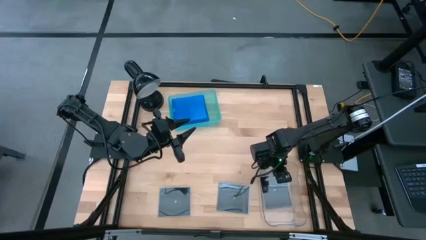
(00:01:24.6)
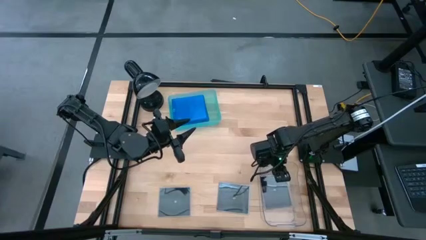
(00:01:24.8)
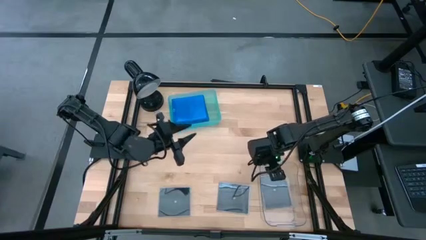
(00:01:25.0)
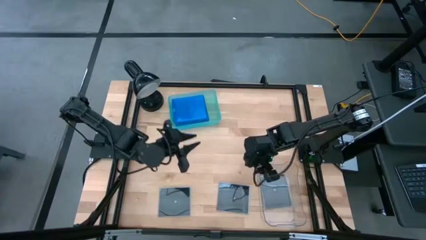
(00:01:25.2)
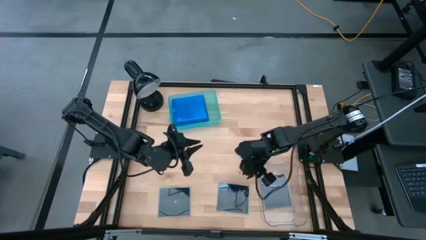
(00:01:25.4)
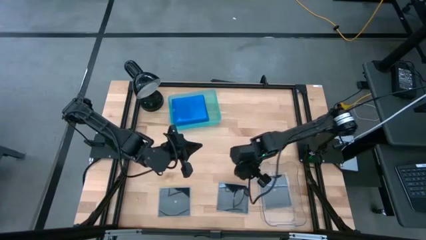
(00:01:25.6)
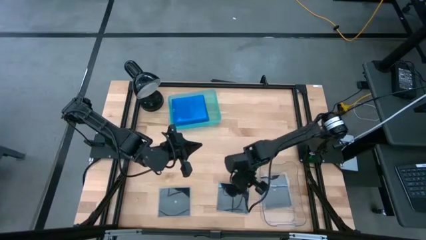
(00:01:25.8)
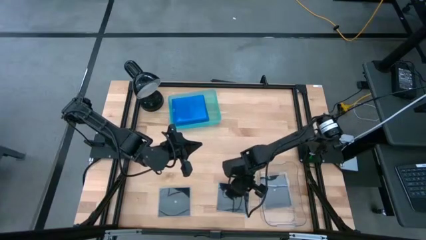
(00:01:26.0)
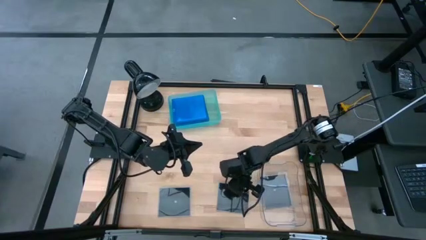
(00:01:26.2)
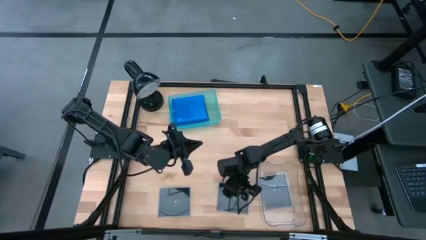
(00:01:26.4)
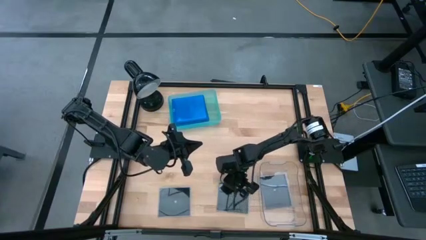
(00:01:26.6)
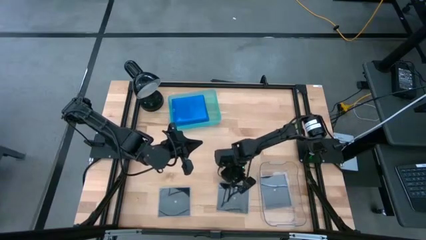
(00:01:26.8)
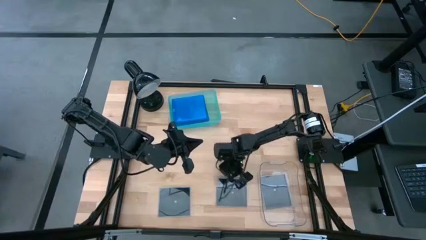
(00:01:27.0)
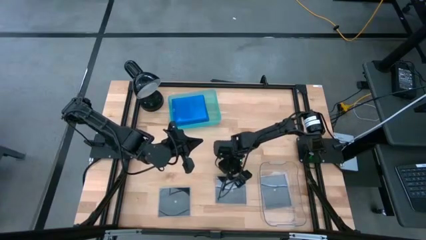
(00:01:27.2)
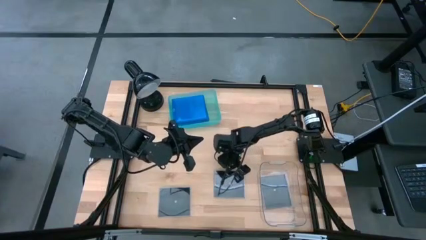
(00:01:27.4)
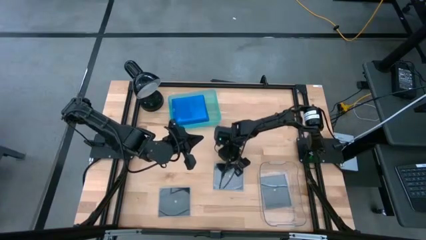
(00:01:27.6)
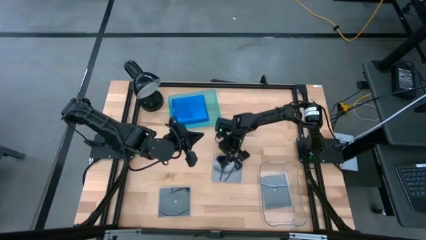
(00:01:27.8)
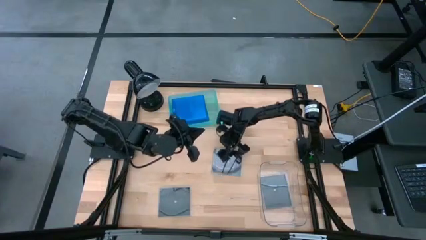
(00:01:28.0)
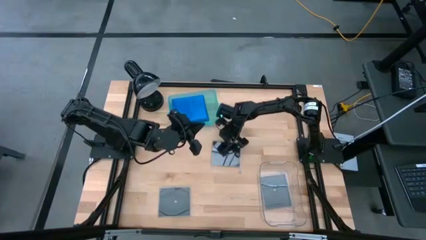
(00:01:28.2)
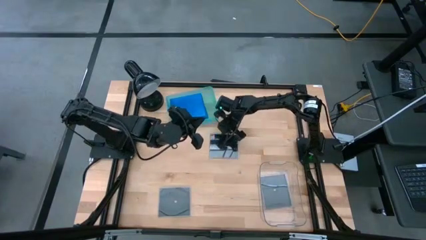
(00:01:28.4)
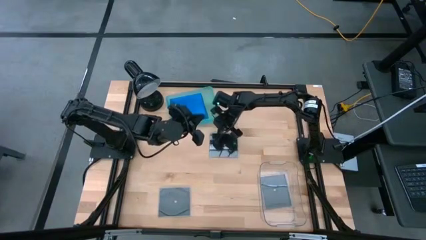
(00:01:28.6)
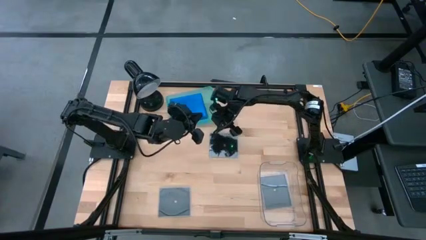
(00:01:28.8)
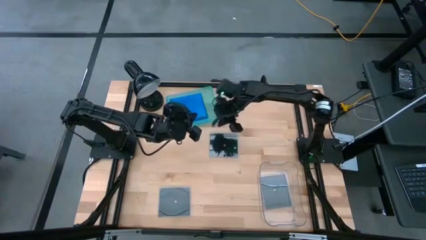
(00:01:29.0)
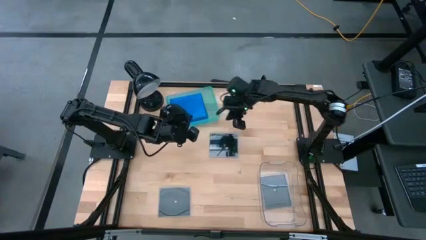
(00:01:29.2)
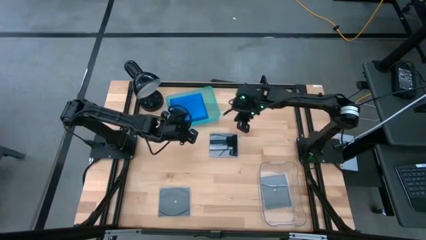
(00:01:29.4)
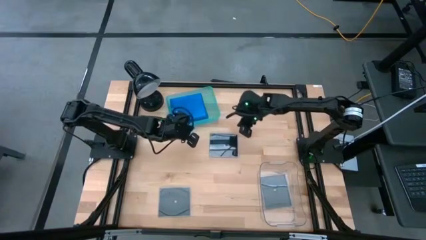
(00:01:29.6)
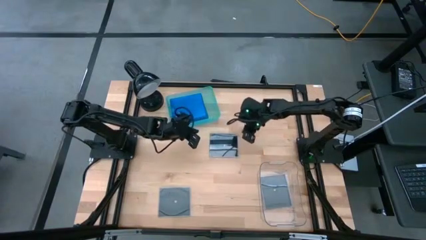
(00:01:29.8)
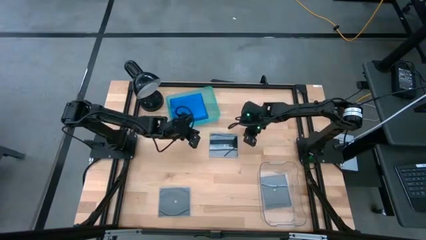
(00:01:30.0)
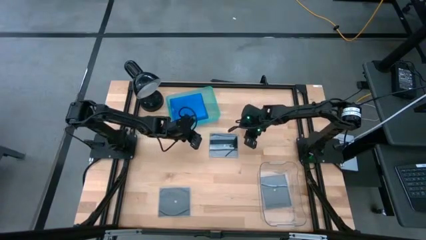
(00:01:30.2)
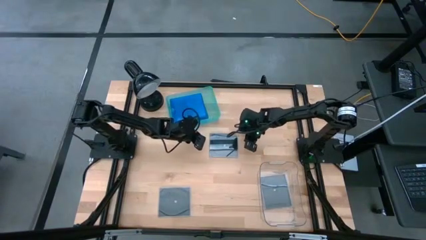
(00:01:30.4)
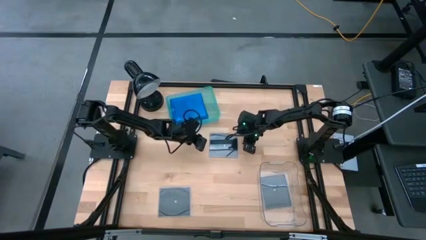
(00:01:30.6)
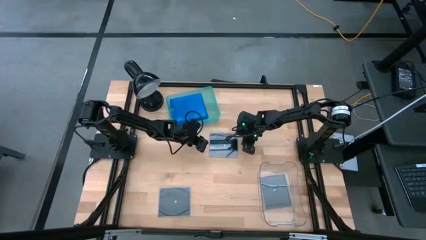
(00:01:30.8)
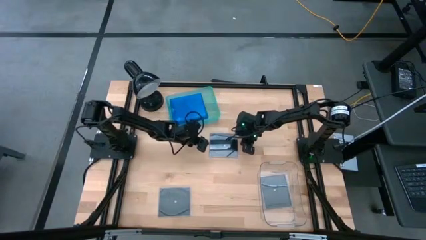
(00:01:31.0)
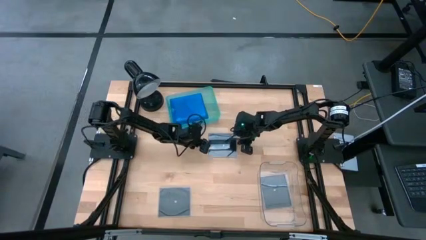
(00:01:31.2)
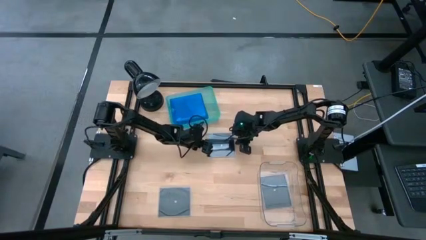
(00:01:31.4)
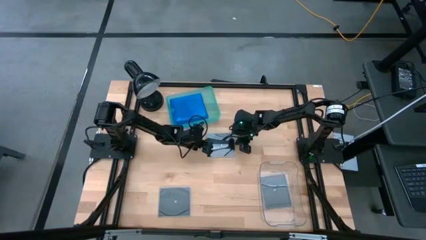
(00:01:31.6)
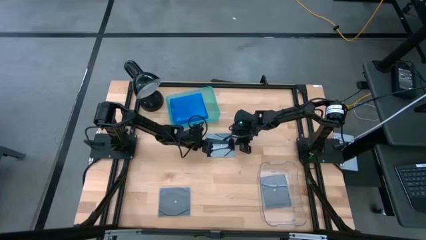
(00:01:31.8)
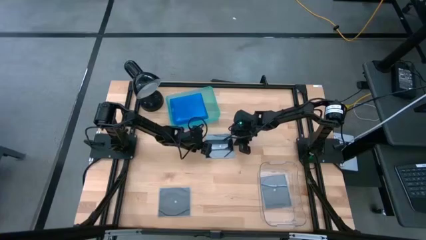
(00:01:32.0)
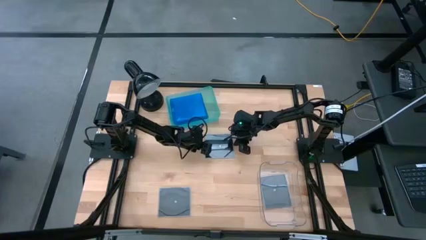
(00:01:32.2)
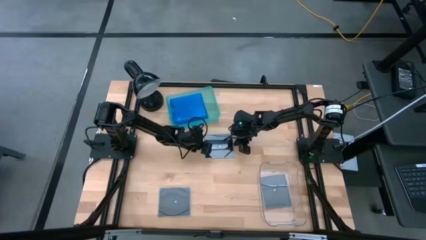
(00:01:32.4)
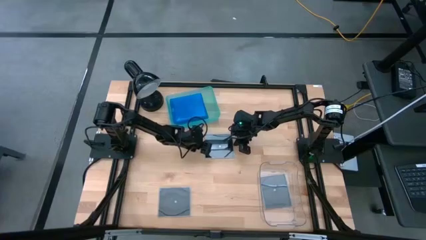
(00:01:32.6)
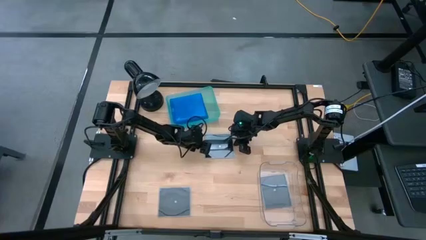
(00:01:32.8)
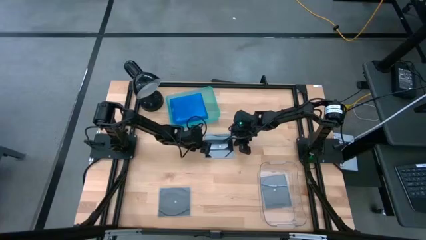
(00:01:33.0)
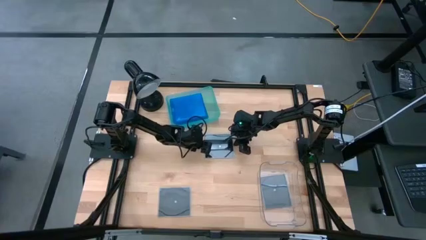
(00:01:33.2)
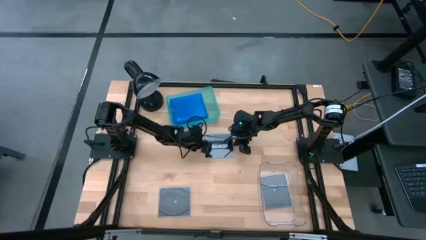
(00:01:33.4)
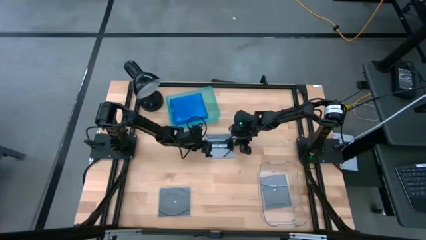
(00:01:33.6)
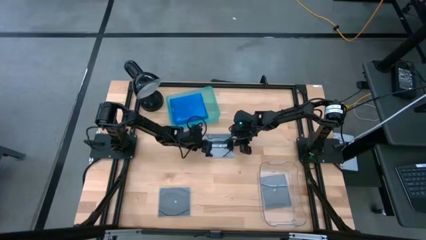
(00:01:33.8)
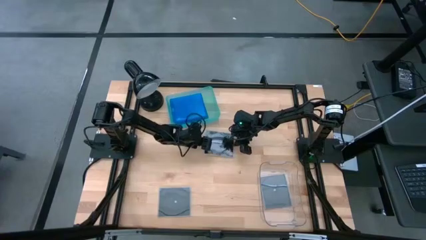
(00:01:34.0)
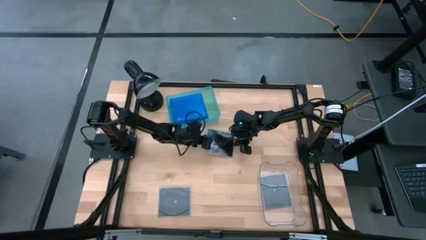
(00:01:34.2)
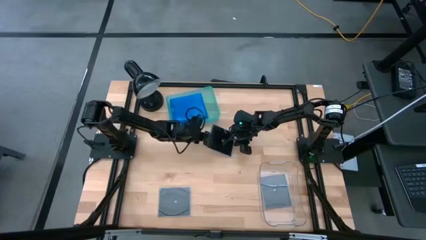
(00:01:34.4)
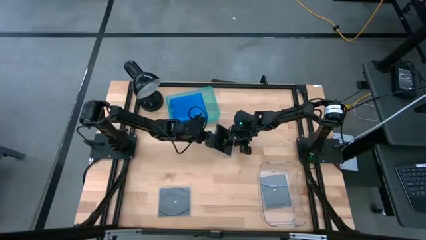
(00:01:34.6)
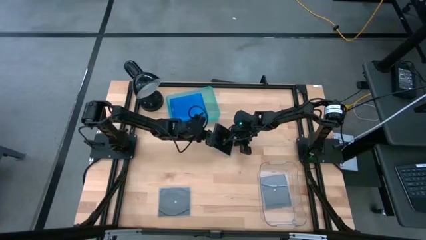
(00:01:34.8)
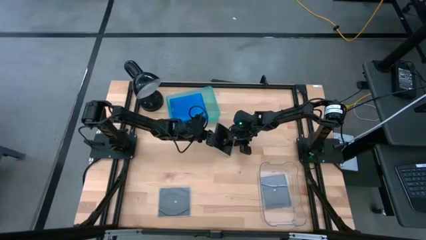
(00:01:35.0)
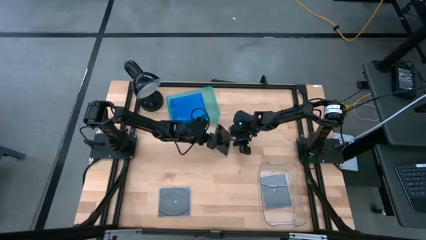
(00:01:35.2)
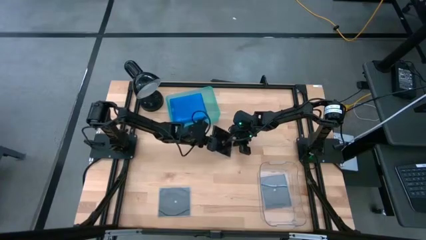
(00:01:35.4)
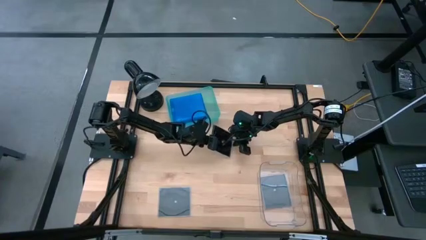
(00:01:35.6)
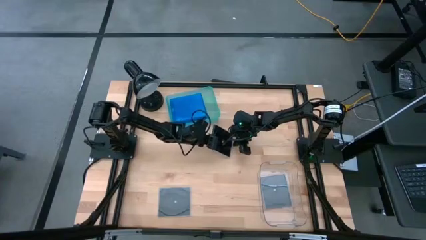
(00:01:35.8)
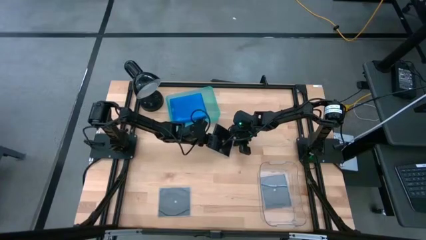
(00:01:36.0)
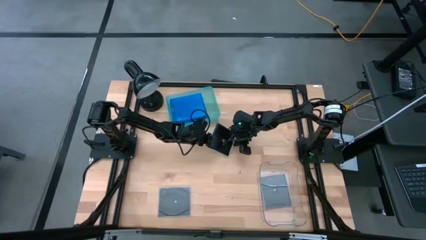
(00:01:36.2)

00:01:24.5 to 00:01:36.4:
Task: Pick & place jewel cases by type
Put the right black CD case into the transparent bin

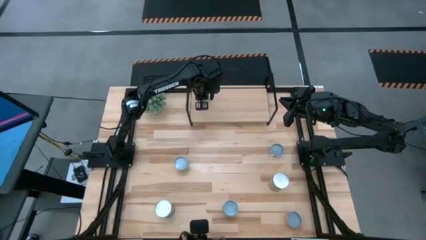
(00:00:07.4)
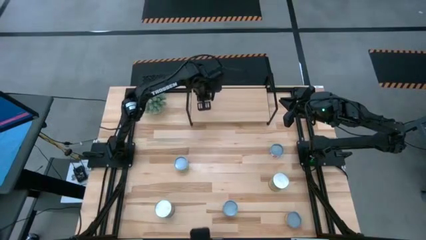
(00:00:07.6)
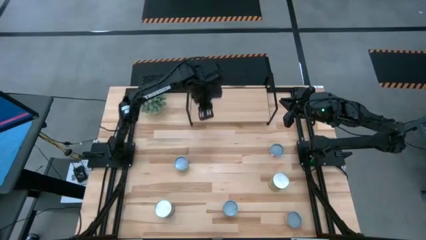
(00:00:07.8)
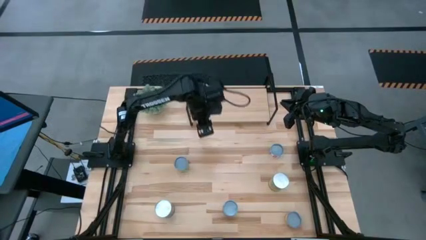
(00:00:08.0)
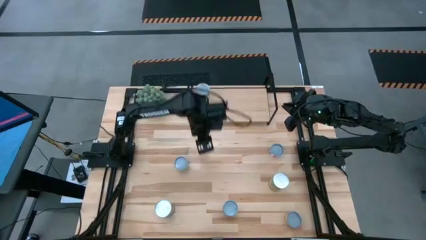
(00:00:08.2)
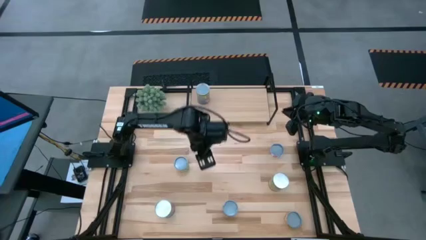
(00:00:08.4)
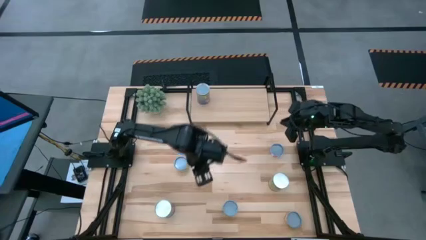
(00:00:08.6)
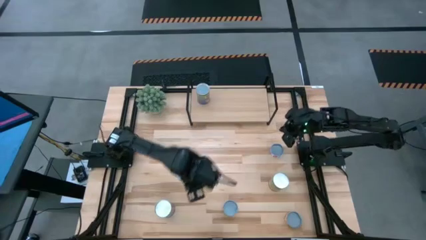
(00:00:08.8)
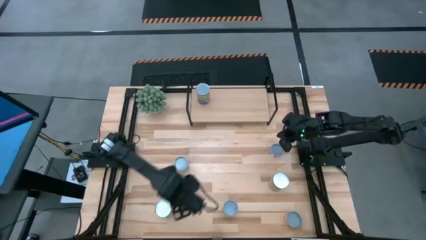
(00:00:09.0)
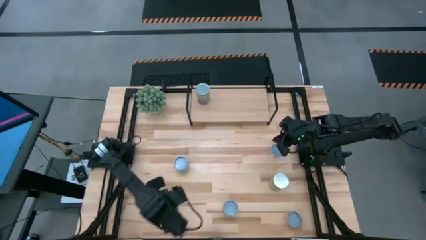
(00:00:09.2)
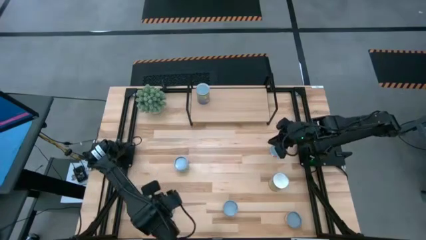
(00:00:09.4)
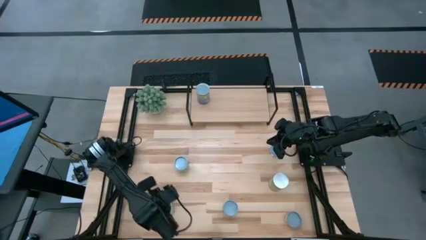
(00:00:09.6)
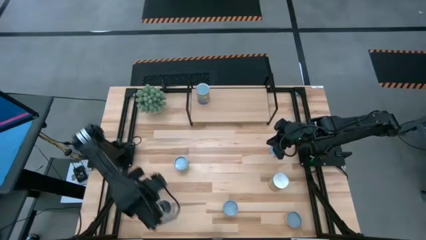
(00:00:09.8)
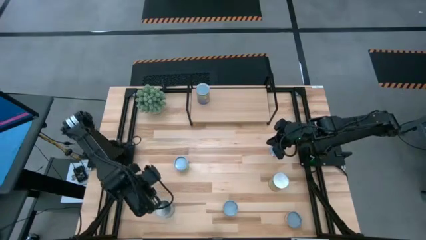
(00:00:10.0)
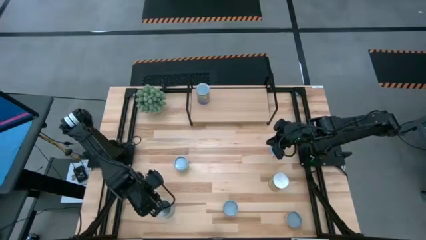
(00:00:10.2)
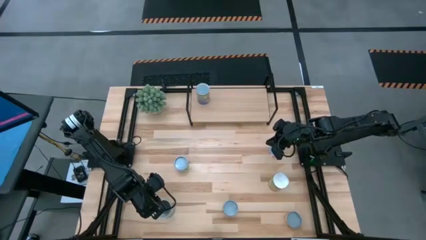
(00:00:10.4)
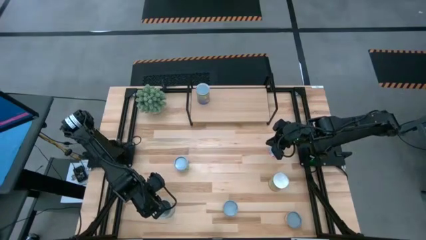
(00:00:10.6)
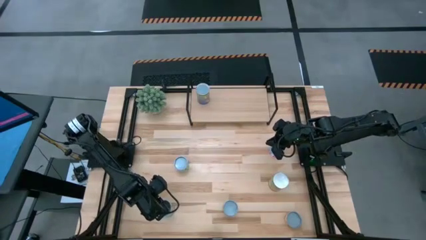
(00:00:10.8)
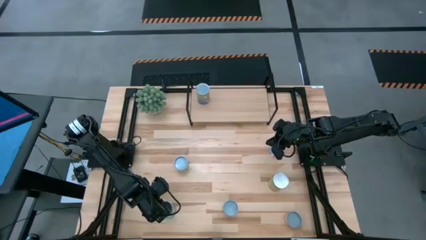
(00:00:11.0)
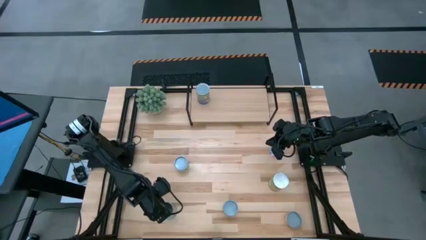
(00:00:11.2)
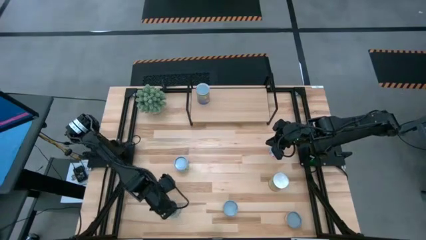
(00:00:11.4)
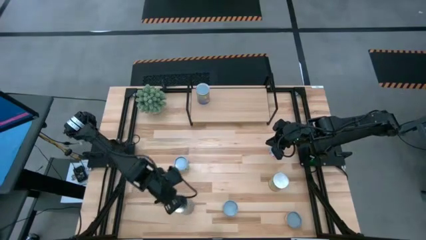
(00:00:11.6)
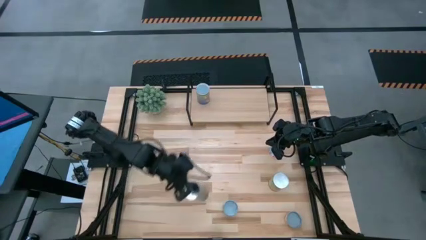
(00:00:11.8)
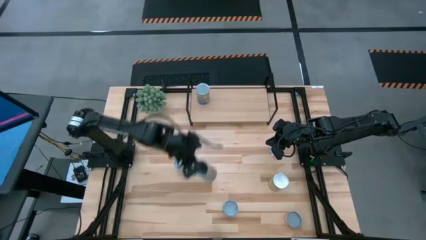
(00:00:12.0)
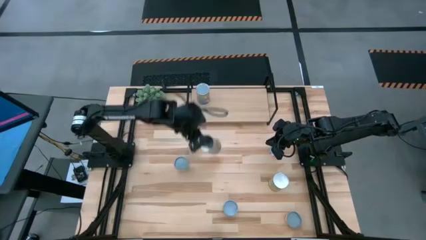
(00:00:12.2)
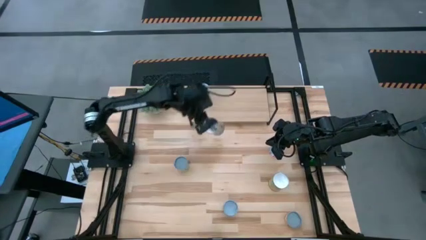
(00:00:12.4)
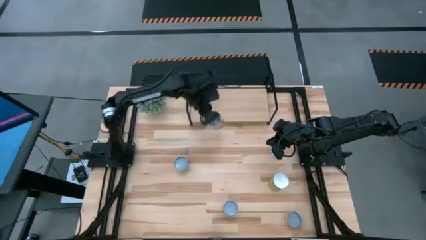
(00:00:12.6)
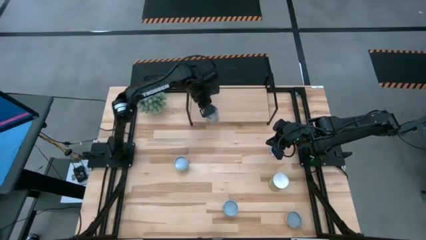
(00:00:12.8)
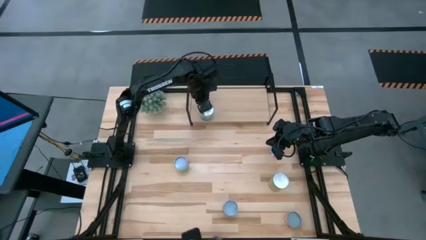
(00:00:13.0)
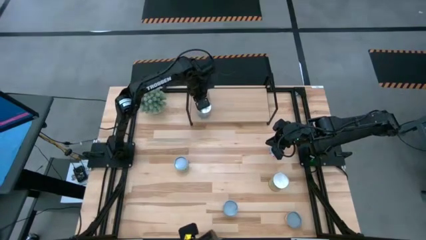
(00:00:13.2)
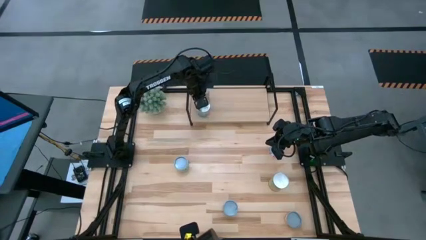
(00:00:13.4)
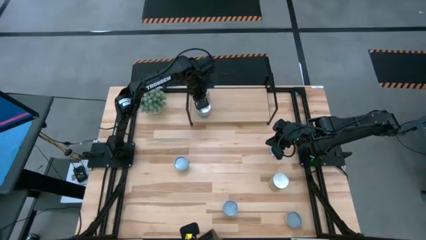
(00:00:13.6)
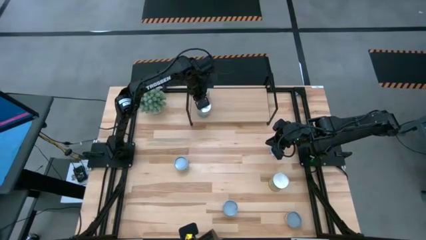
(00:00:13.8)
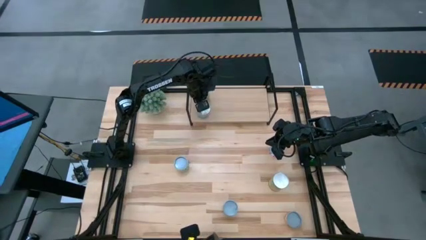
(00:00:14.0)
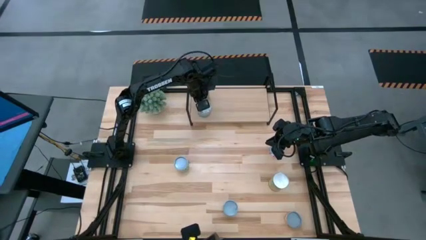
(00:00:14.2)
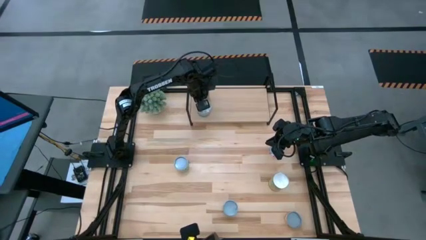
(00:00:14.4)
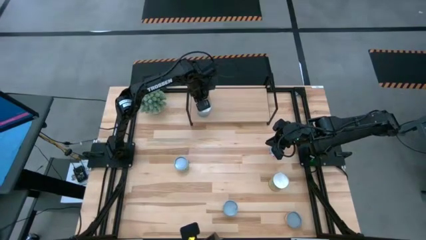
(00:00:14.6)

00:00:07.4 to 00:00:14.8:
Task: Pick and place cans onto a shelf
Put the canned tomatoes on the shelf
